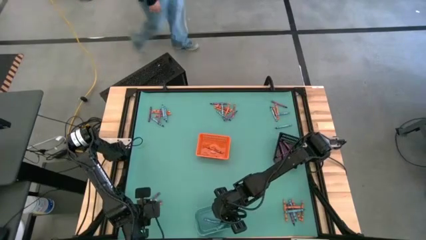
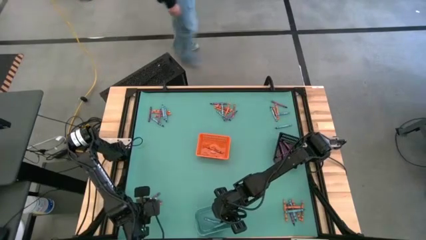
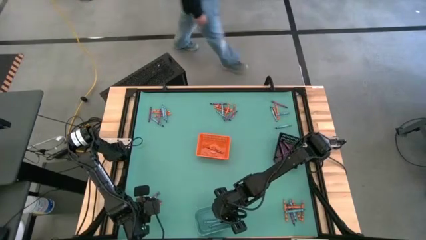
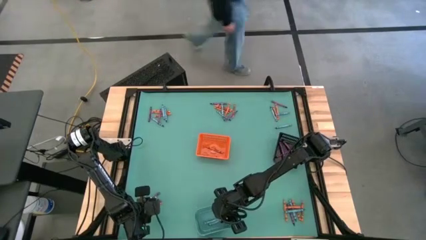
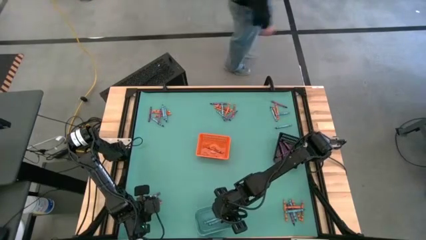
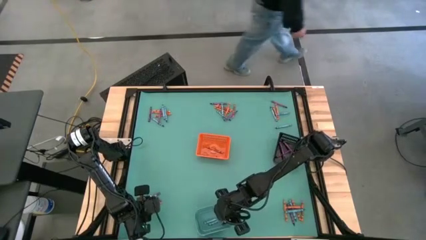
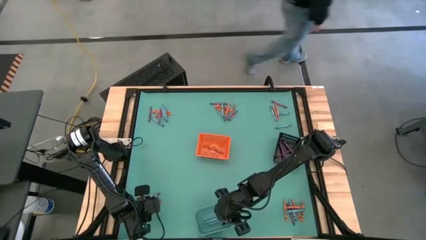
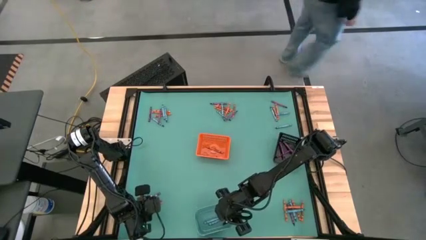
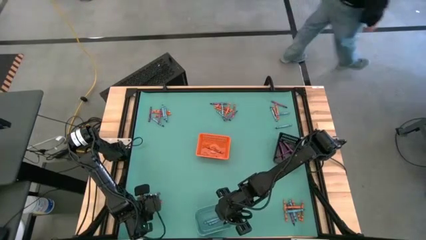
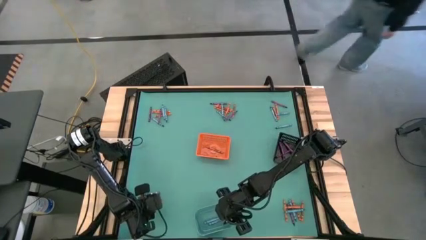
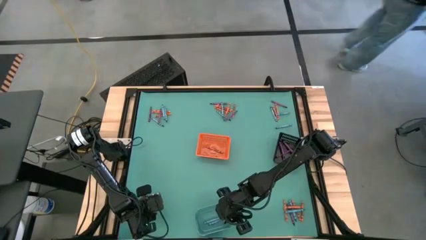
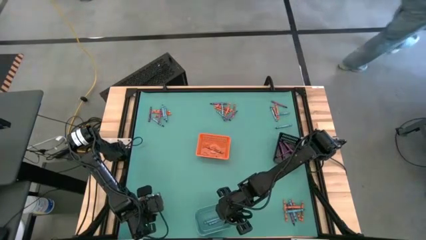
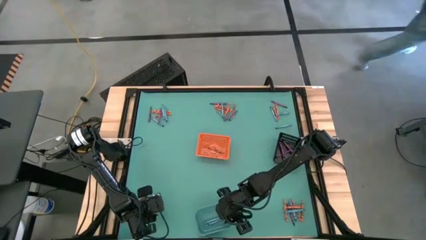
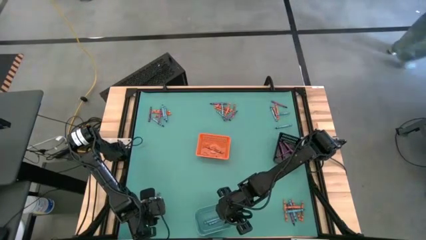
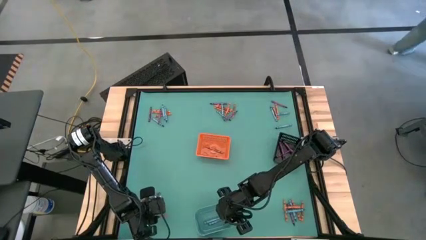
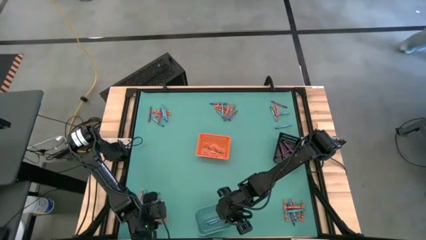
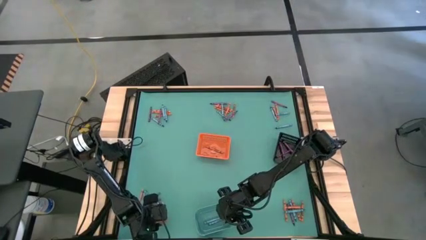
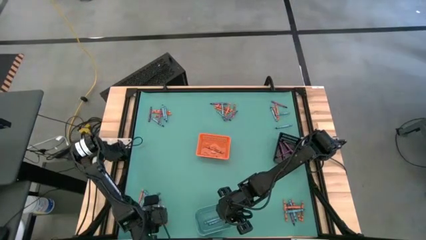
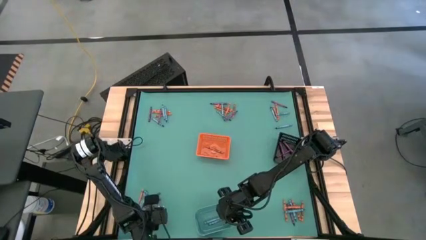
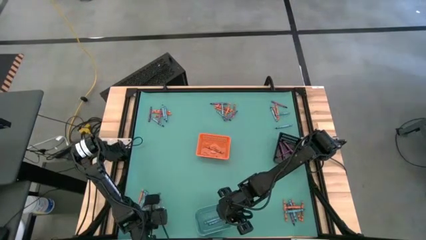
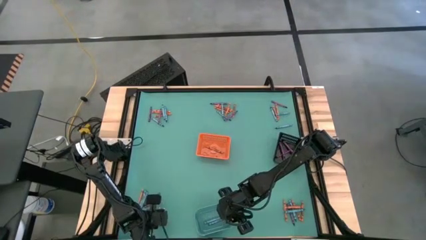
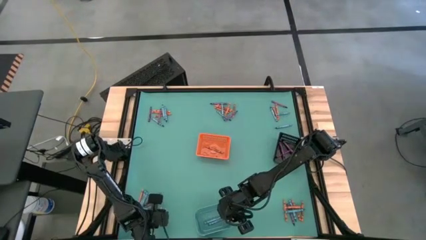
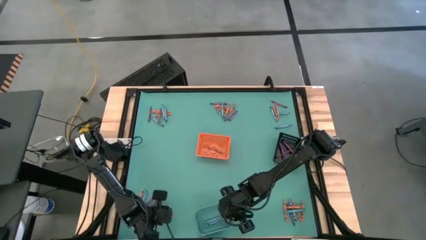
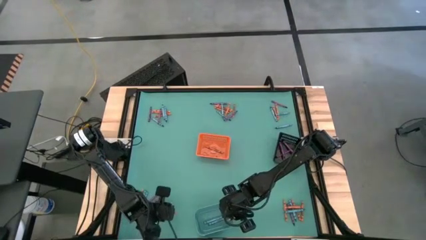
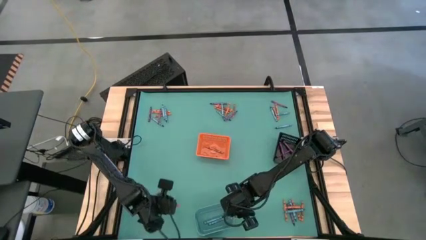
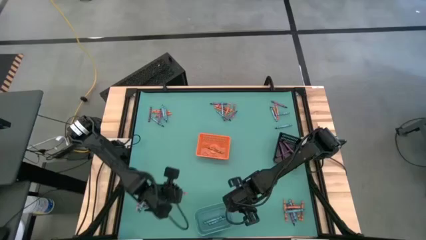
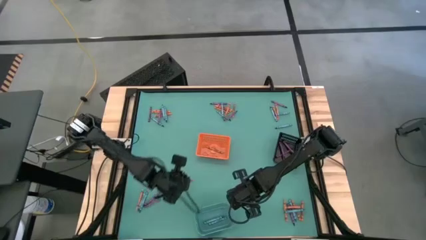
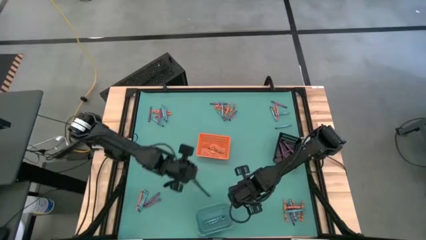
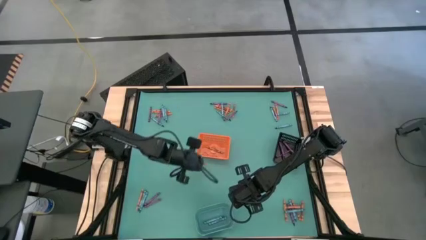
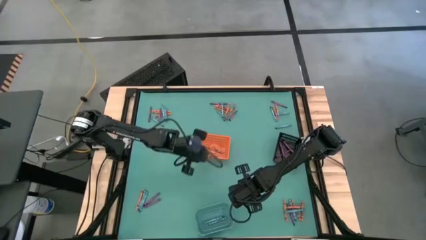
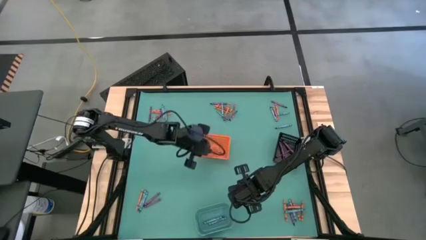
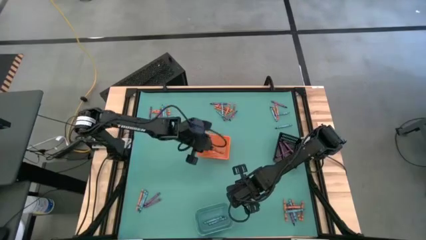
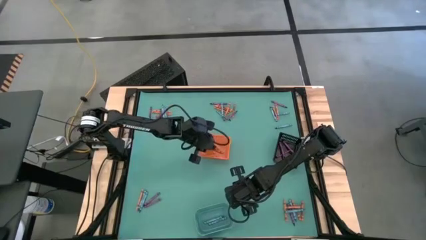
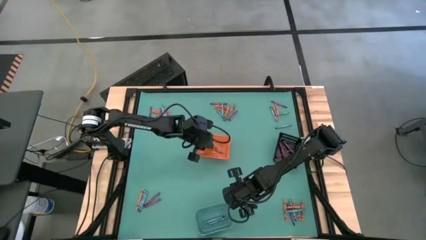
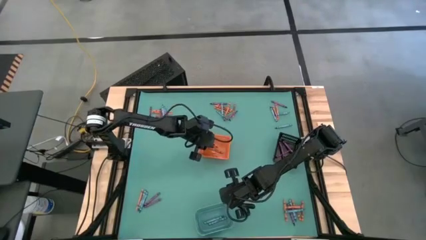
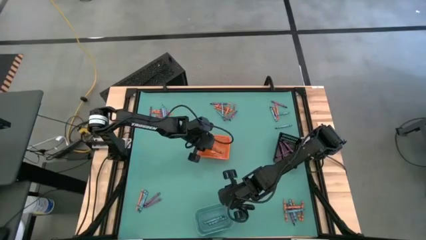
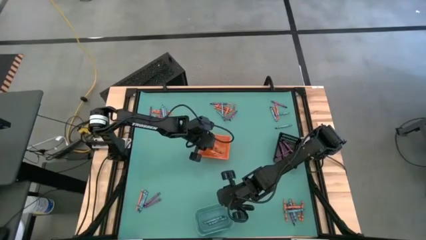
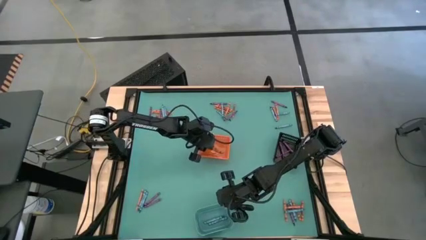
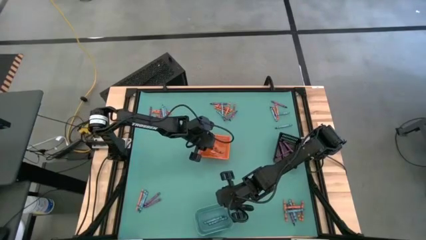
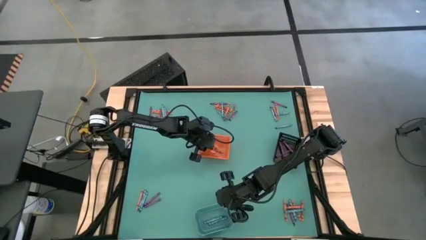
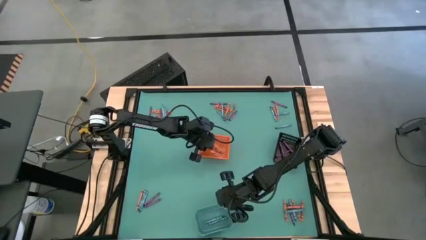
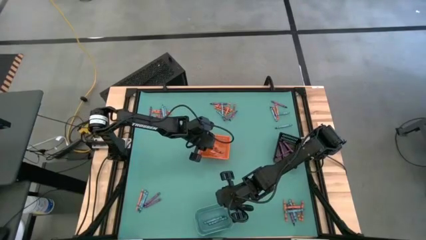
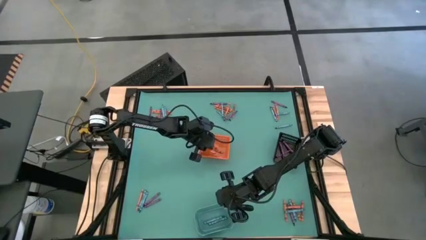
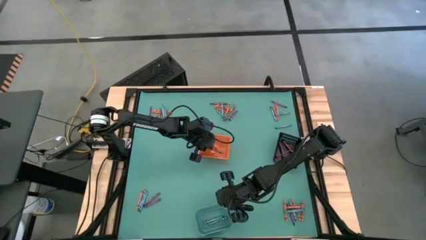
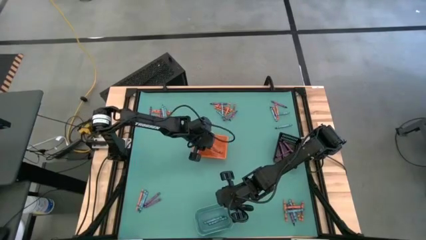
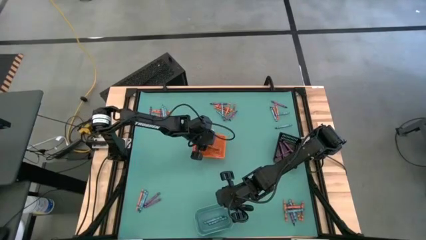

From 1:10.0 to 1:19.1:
Task: Sort crayons
Put the orange crayon into the orange bin
